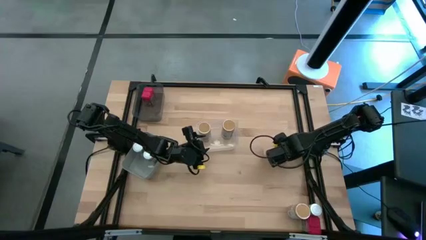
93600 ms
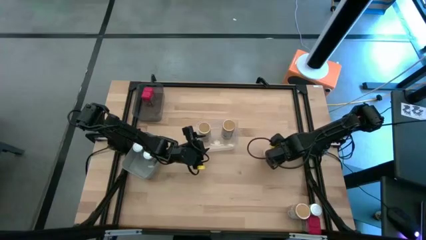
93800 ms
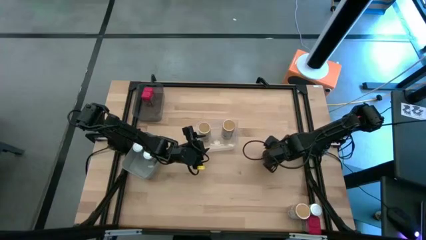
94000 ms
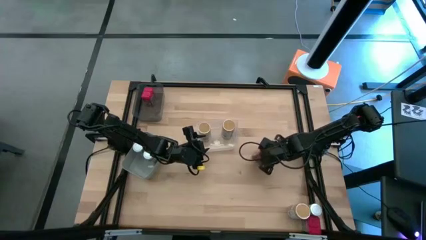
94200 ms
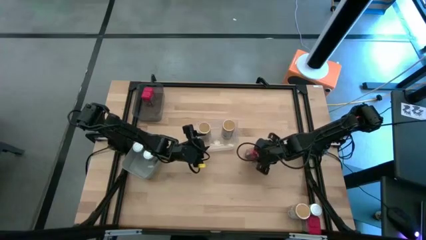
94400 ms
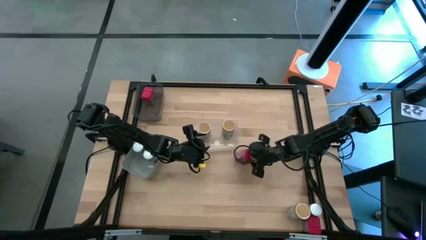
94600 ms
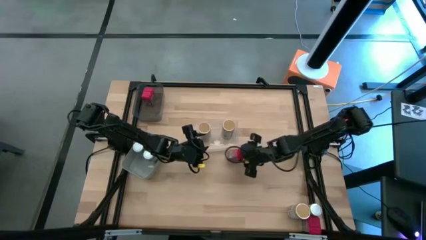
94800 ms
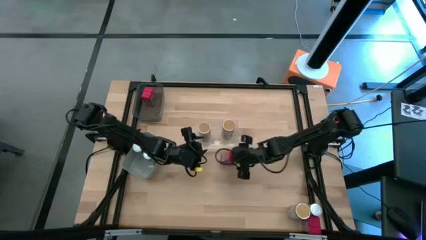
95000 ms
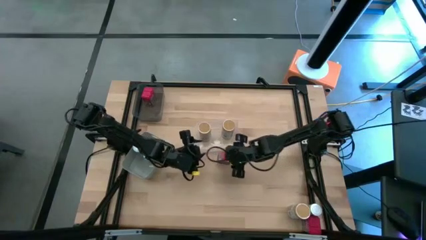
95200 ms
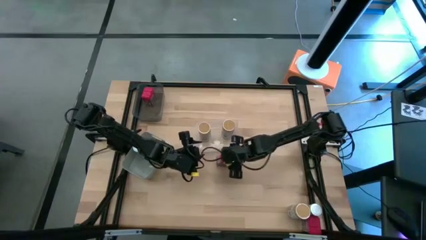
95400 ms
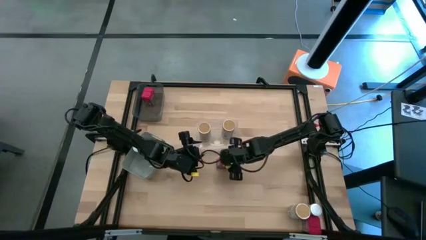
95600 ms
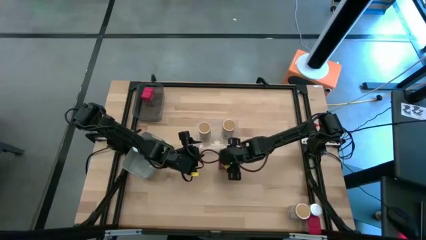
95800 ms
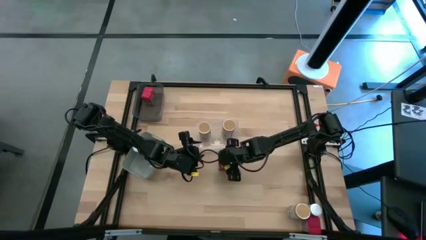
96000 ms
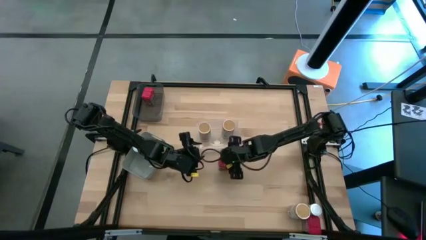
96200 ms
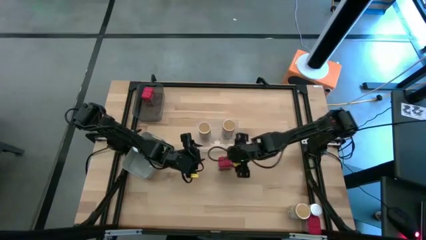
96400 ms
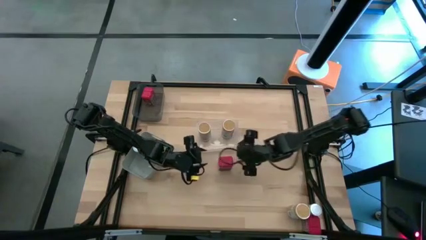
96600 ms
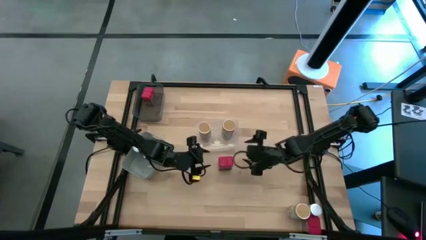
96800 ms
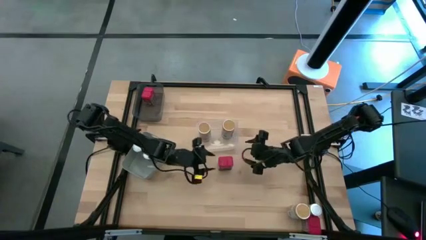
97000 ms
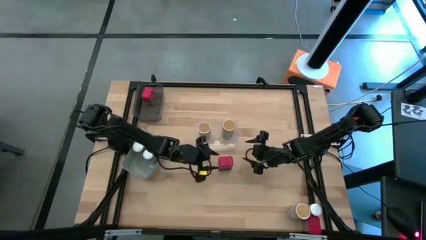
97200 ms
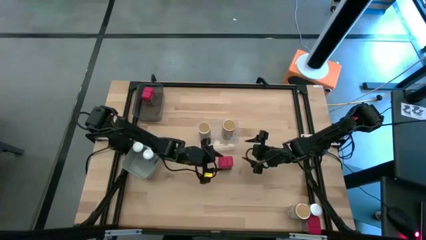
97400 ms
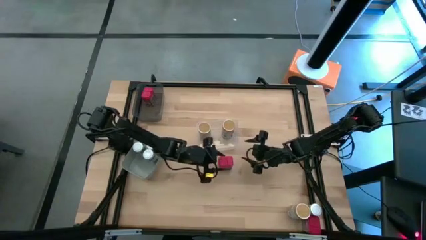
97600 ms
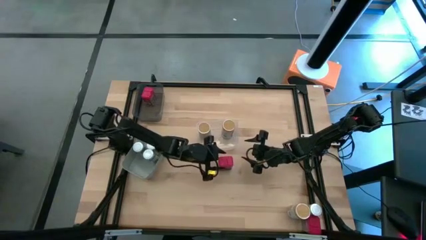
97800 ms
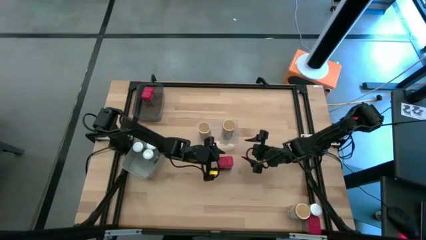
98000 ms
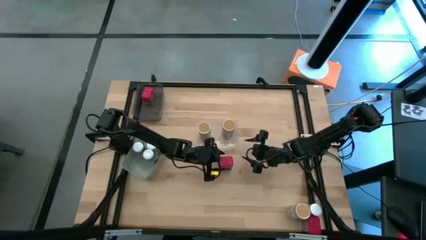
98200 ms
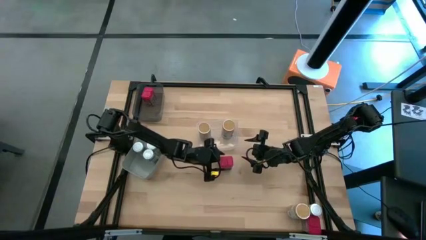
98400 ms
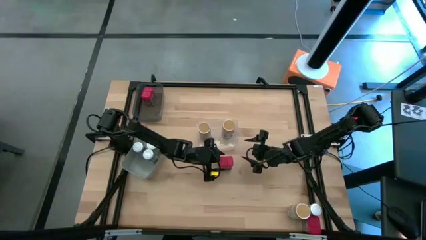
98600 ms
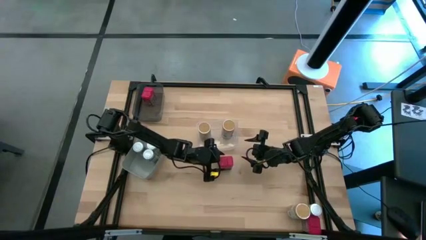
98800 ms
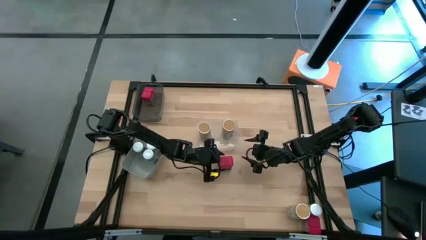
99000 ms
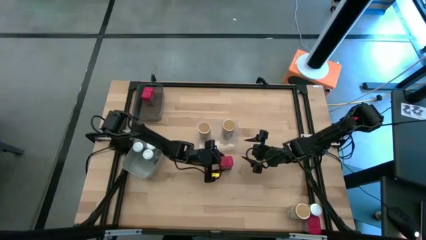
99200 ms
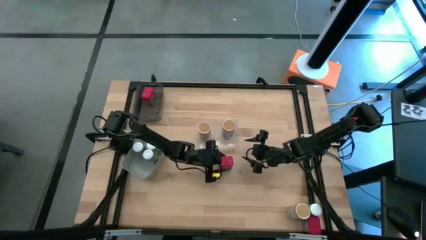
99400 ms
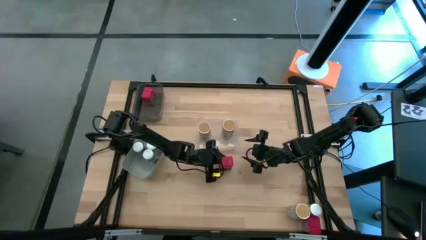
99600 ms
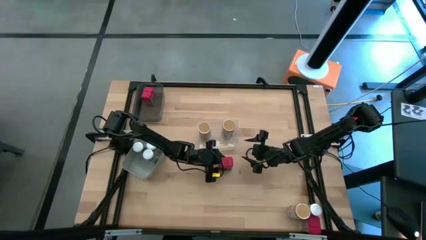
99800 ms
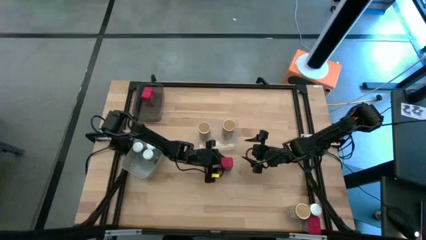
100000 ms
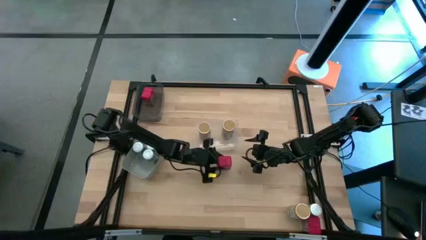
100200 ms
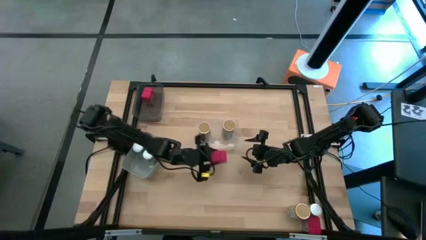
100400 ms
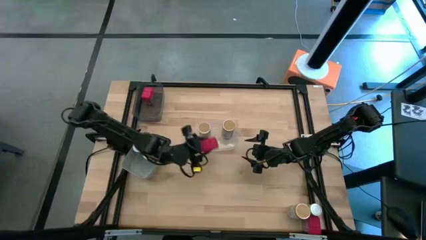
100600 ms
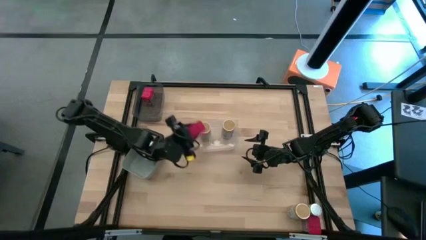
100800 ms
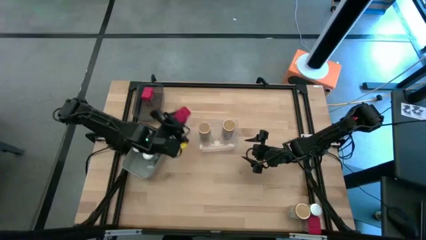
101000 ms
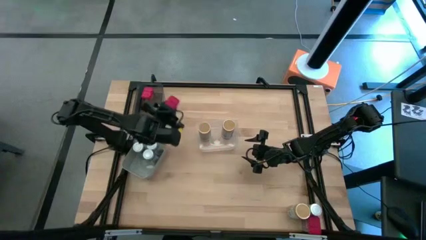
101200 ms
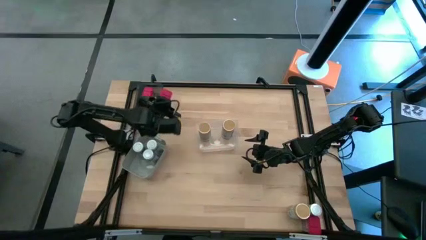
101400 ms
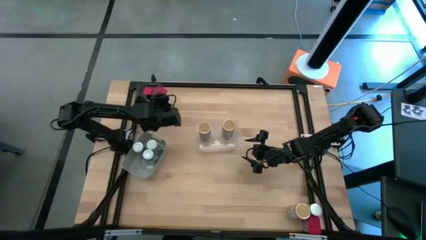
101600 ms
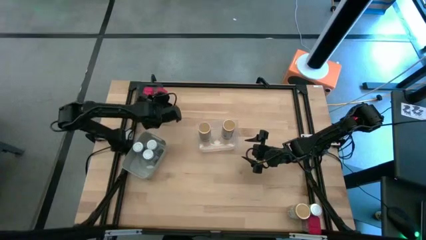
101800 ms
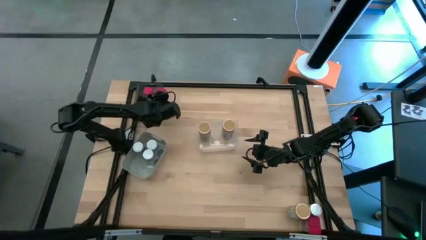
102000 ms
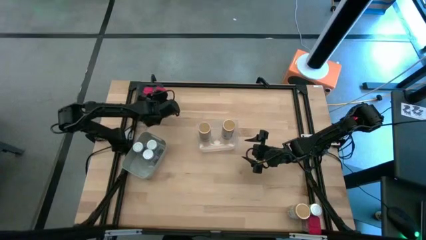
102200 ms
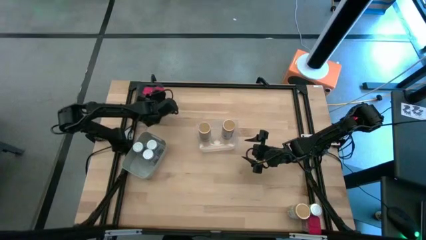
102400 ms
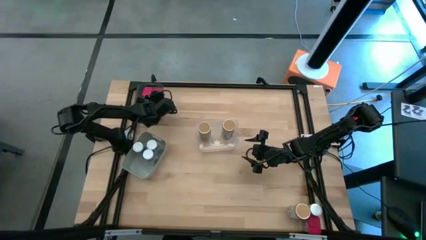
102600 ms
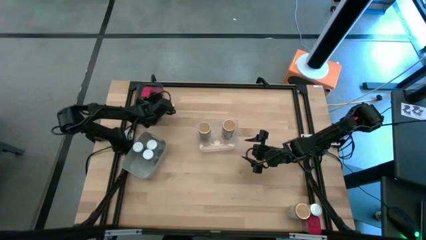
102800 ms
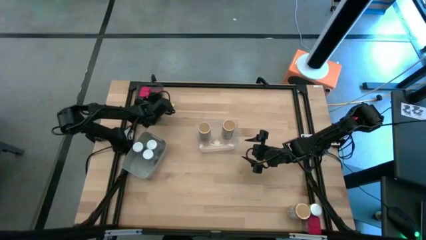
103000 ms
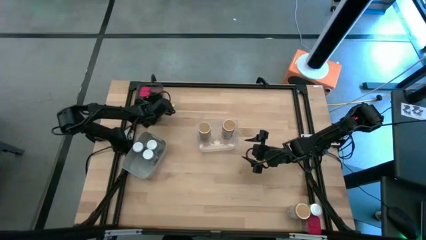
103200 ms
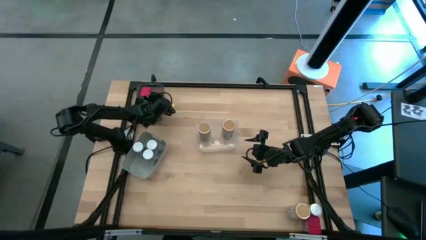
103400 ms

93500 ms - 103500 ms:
Task: Sort spices by type
Put the top red seasoning can into the black bin

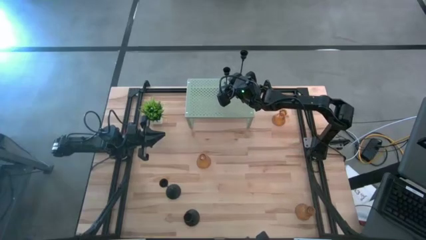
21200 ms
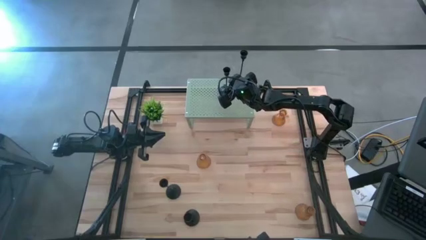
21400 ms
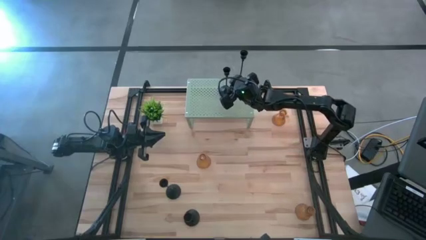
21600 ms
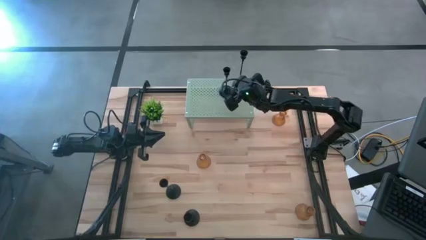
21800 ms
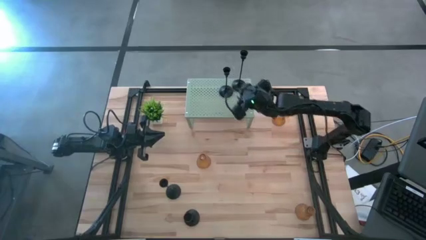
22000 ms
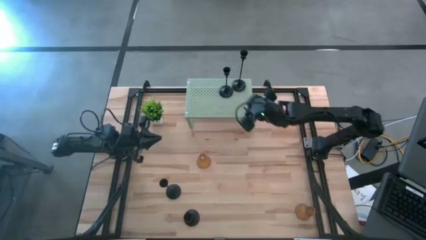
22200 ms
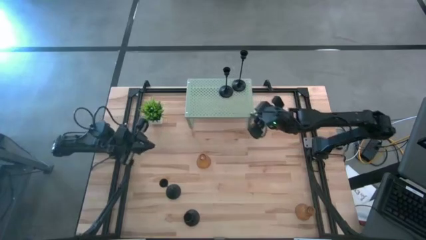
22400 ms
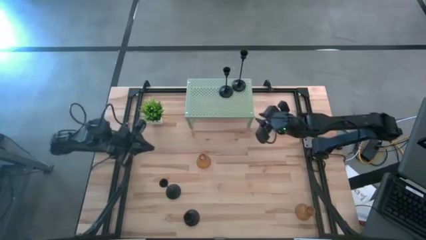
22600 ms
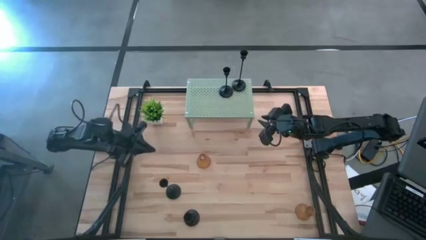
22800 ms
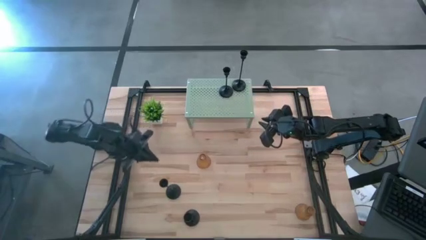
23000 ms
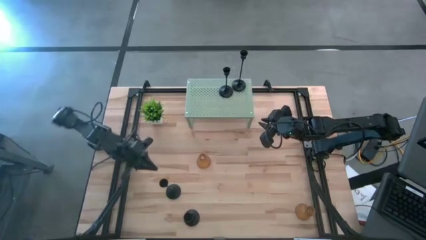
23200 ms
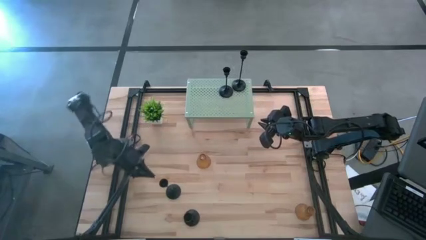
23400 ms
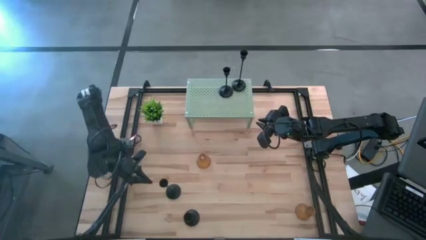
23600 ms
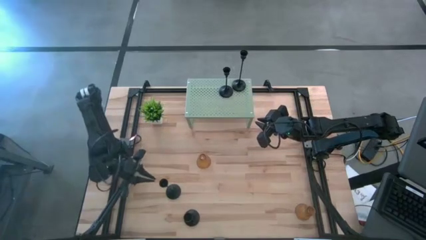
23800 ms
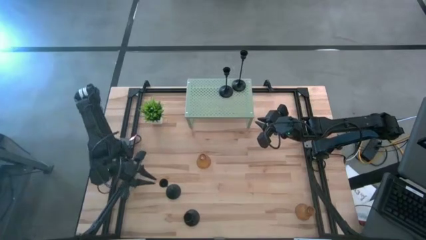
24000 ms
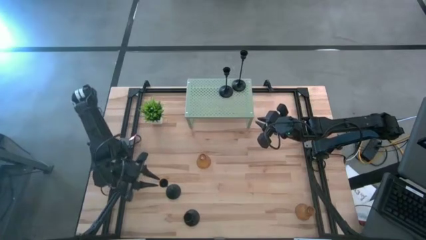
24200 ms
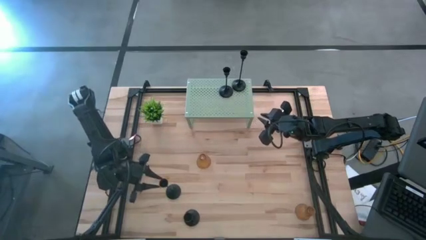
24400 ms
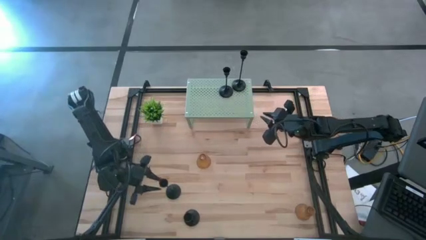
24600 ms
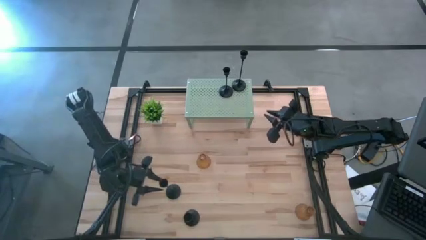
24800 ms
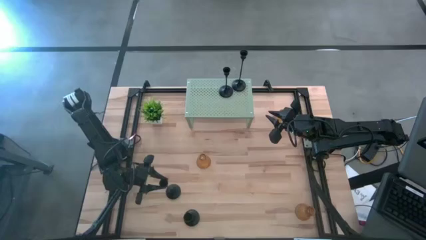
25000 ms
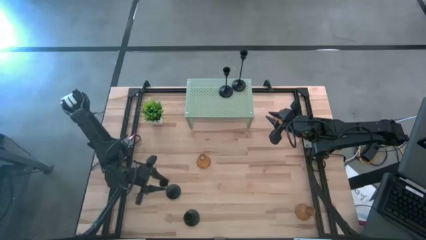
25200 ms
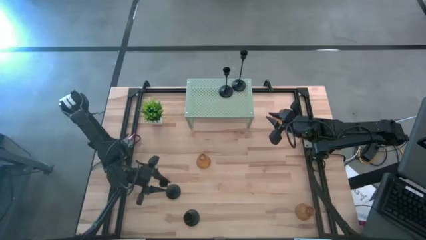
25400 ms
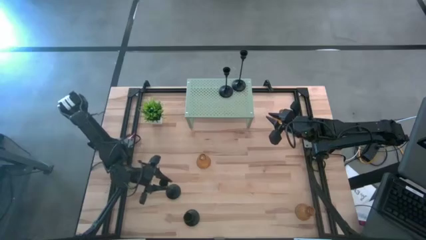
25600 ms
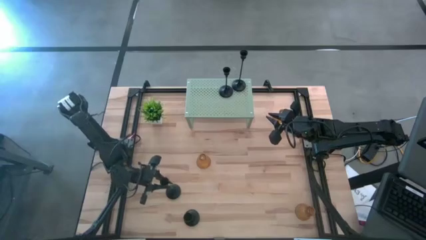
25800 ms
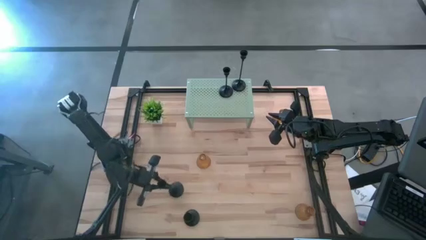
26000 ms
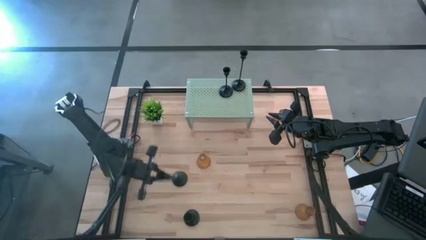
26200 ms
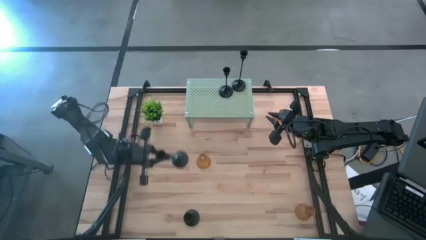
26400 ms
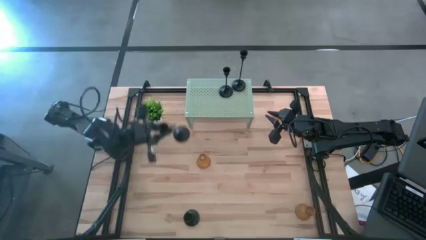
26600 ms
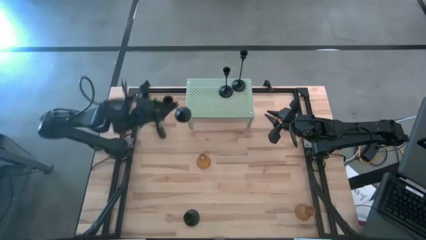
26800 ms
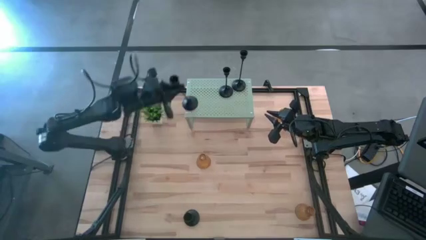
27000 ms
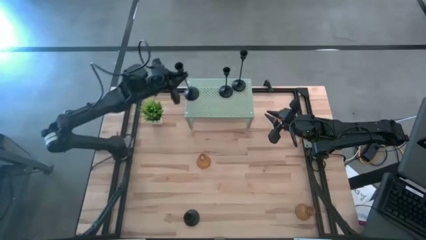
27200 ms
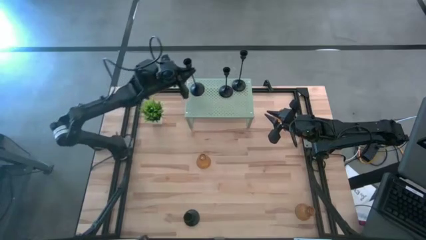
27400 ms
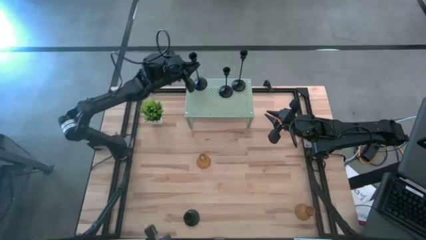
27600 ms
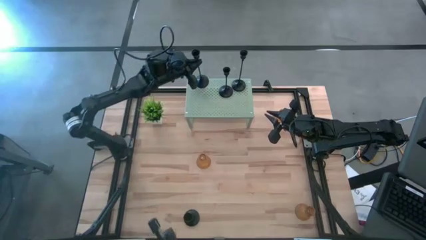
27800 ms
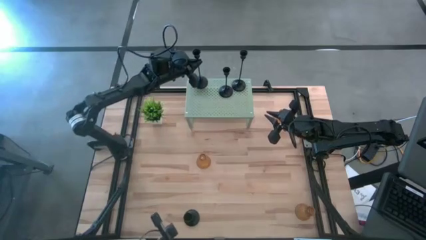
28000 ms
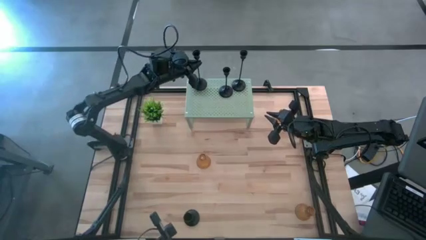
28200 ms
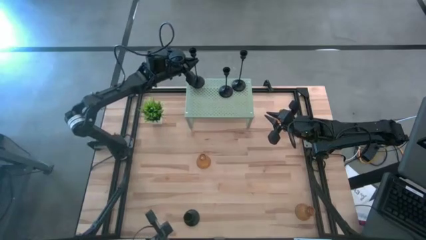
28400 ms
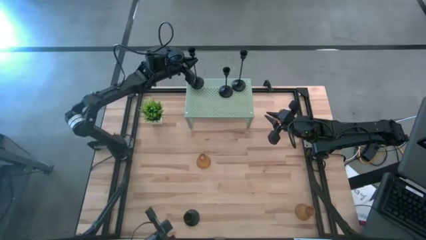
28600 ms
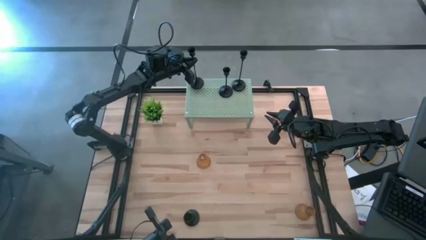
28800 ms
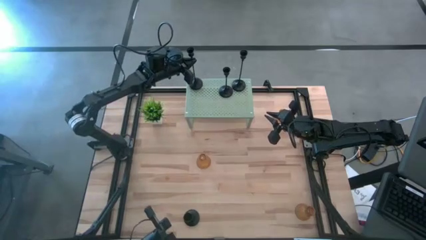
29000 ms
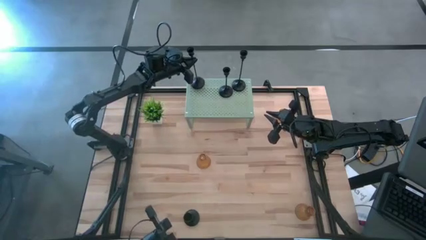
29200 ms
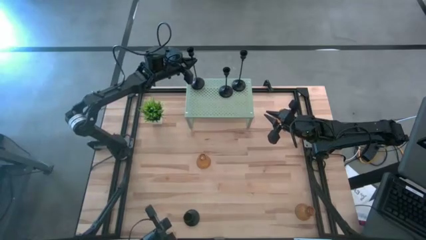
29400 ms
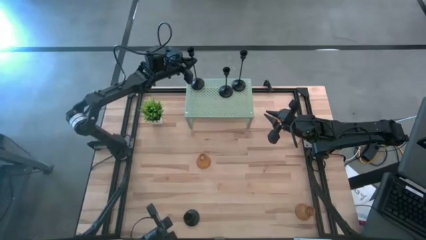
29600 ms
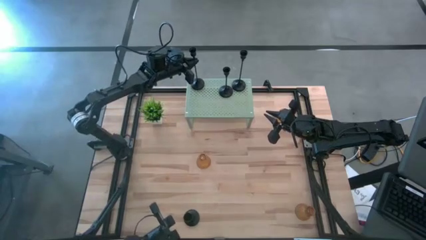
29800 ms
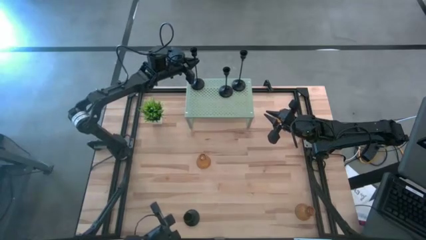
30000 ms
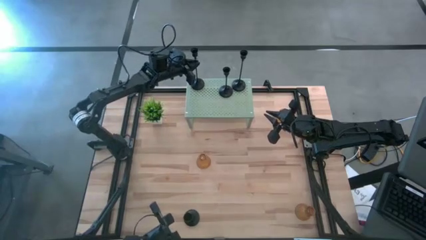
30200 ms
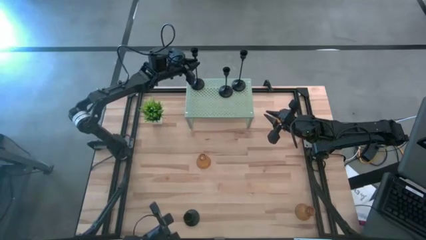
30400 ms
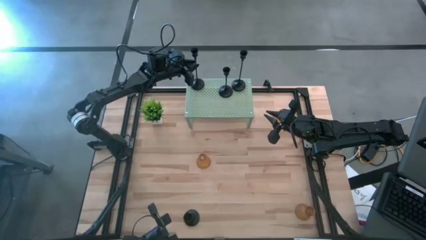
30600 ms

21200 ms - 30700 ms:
Task: Pick & Place candle stick holders
Put the black candle holder on the shelf aligned with the other black candle holders
